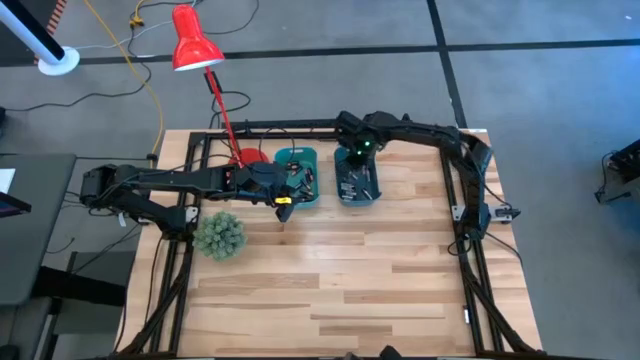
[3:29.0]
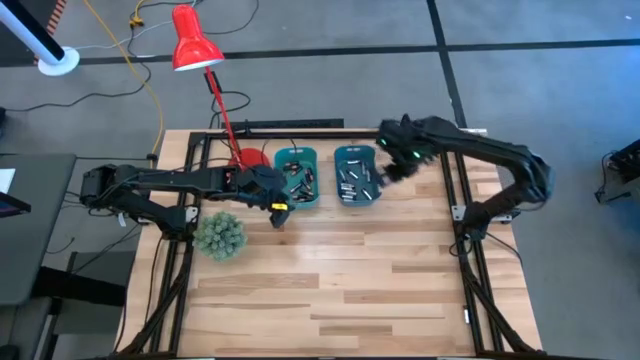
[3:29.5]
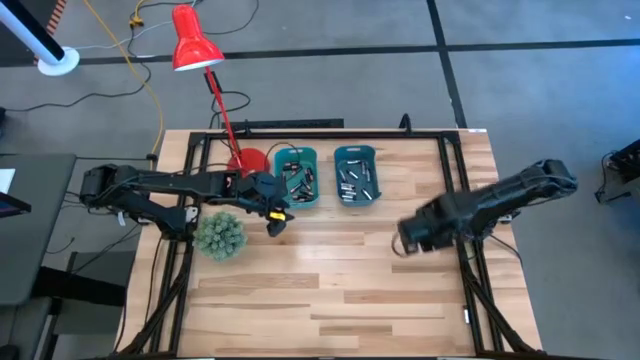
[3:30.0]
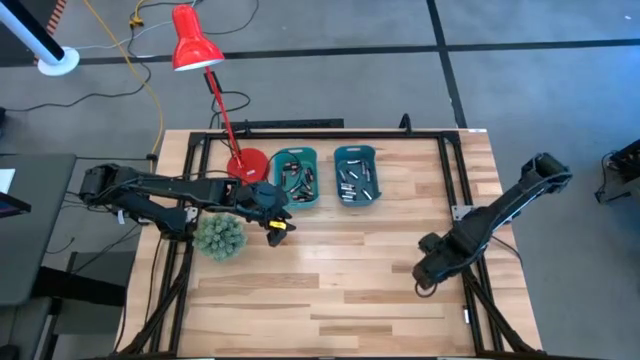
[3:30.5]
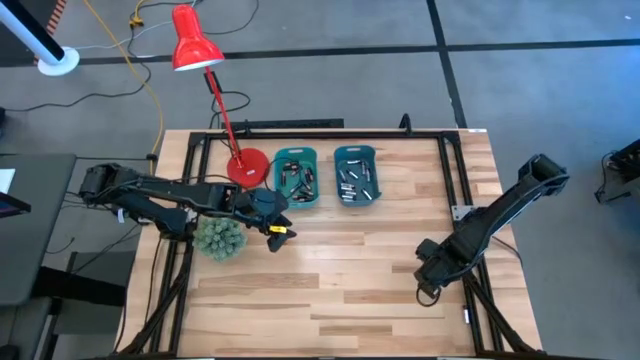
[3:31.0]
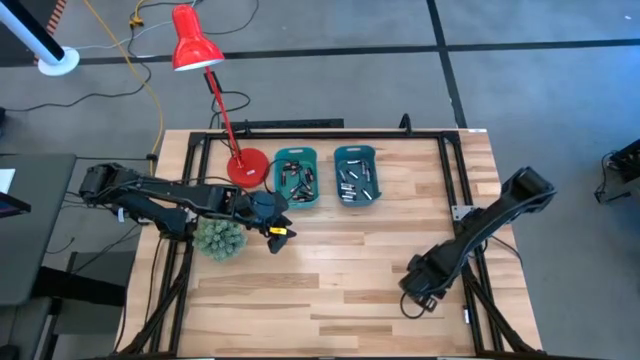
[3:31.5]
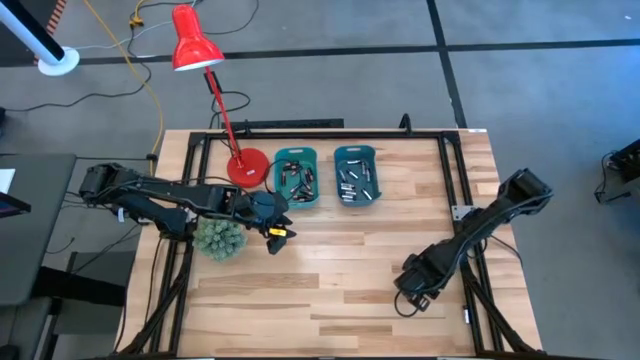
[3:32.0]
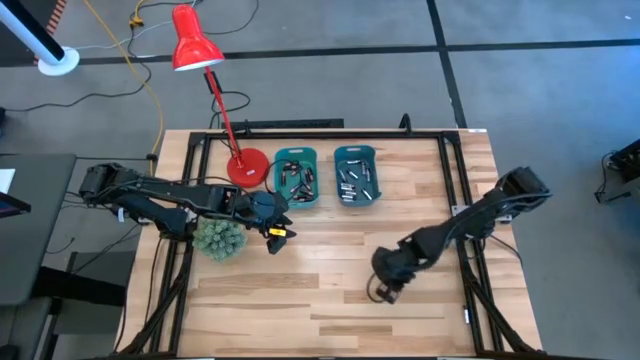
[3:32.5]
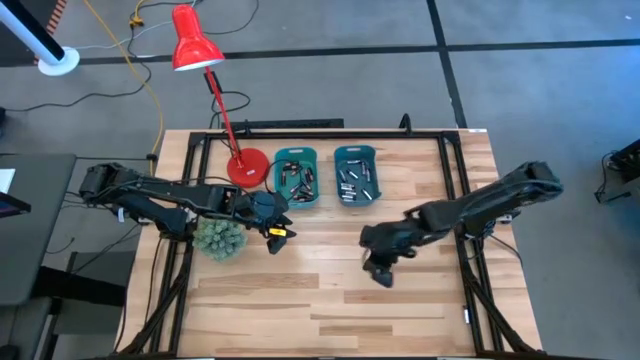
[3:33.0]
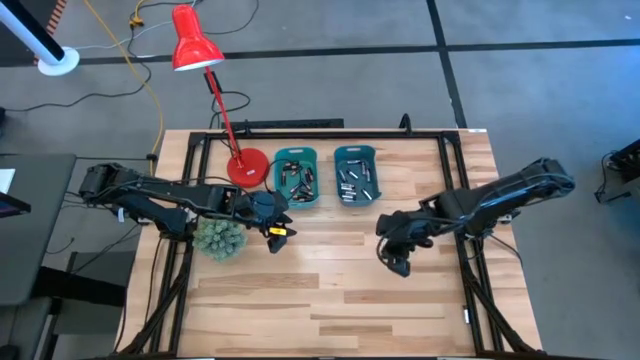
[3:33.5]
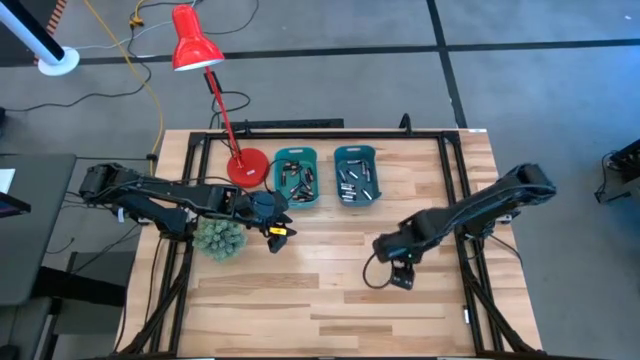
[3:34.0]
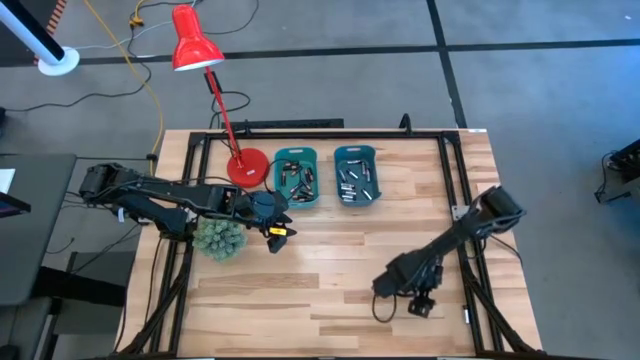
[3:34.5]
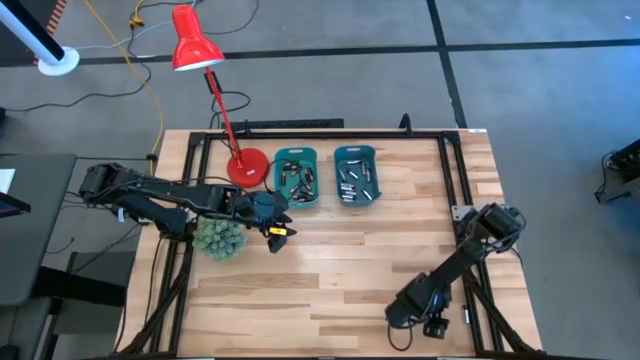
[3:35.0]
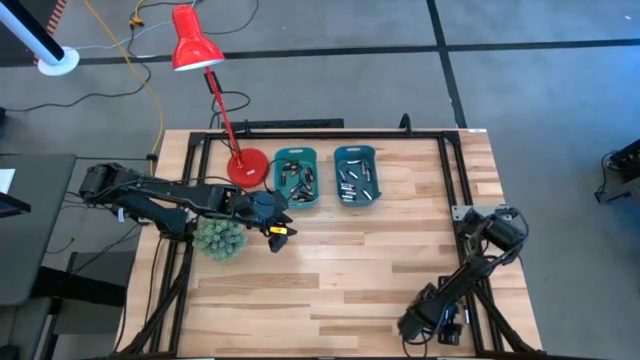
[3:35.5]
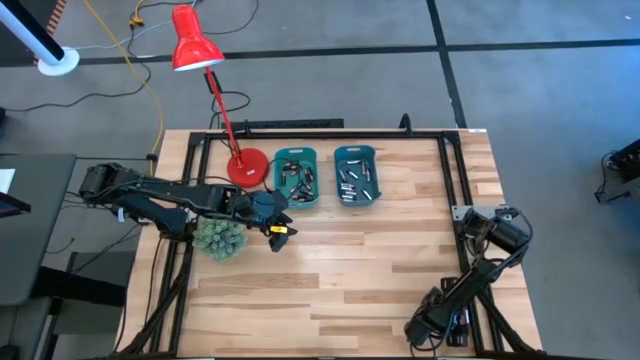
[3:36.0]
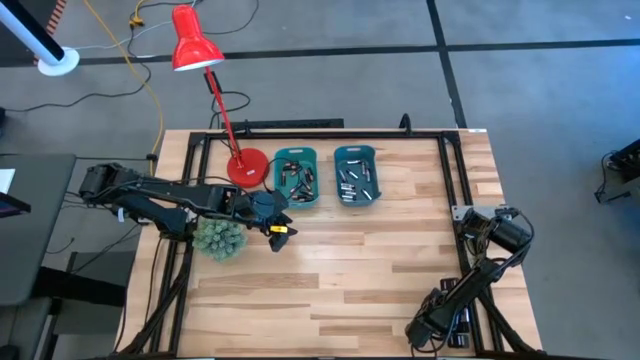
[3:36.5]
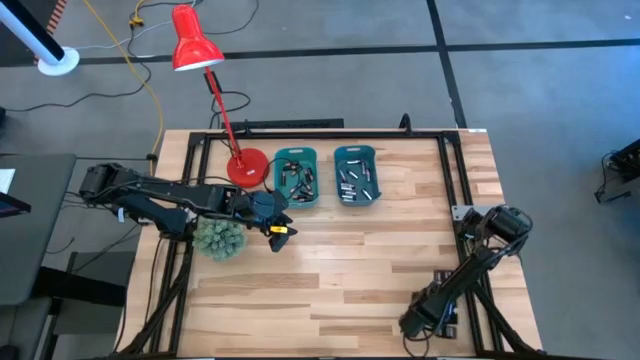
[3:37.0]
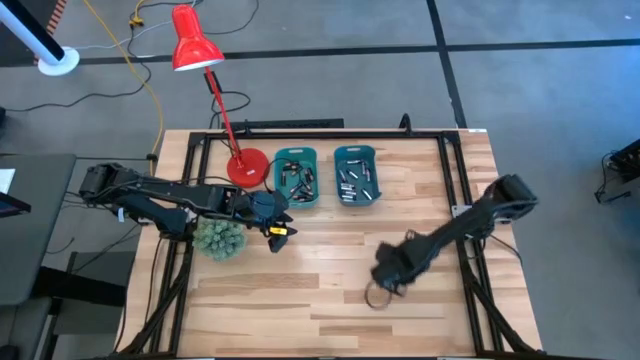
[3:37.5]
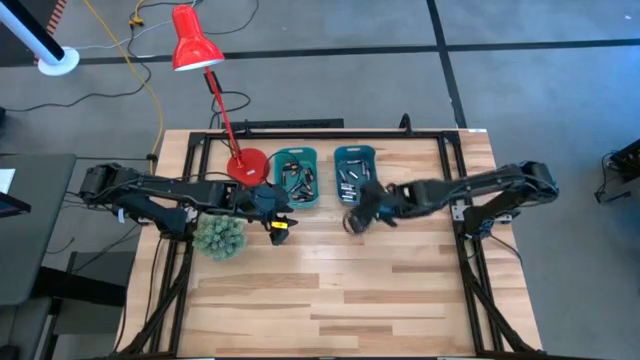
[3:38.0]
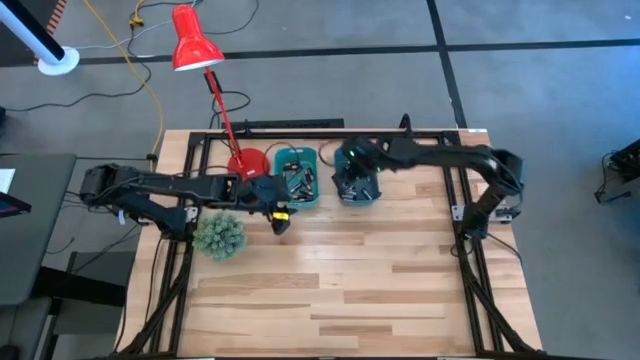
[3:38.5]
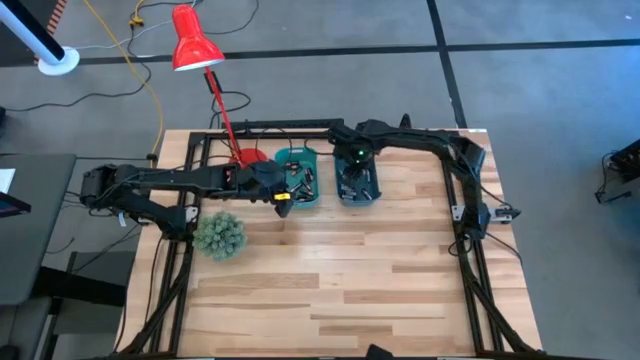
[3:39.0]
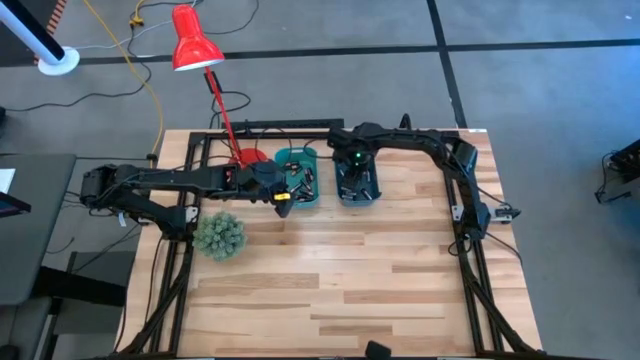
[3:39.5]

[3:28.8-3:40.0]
Task: Sort batteries
Put the silver battery into the blue bin

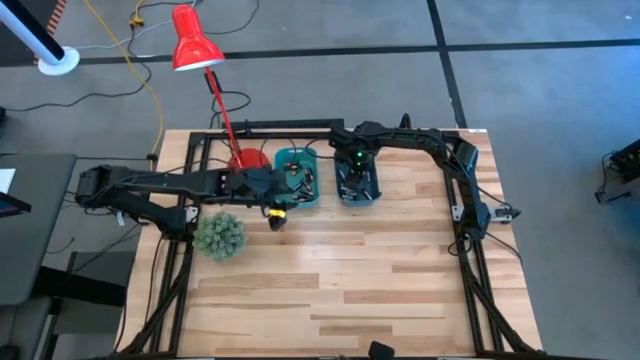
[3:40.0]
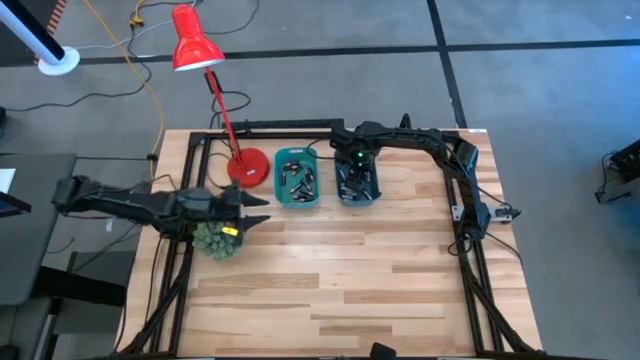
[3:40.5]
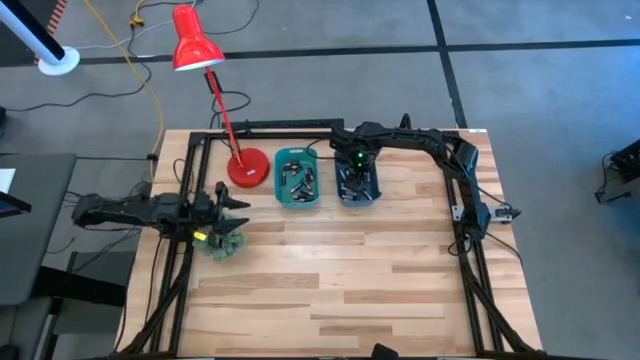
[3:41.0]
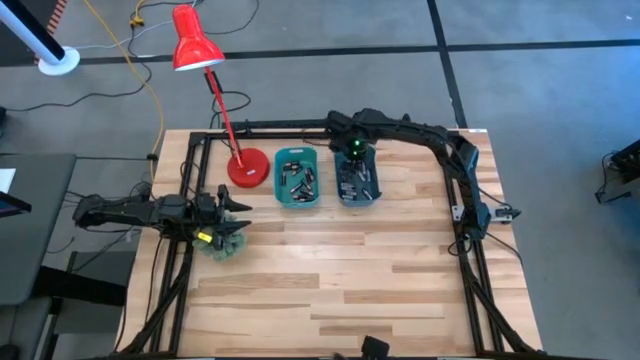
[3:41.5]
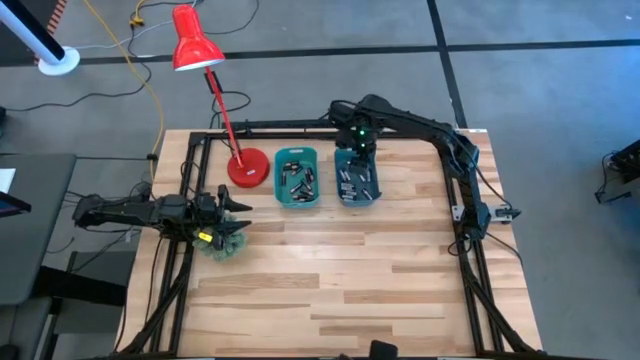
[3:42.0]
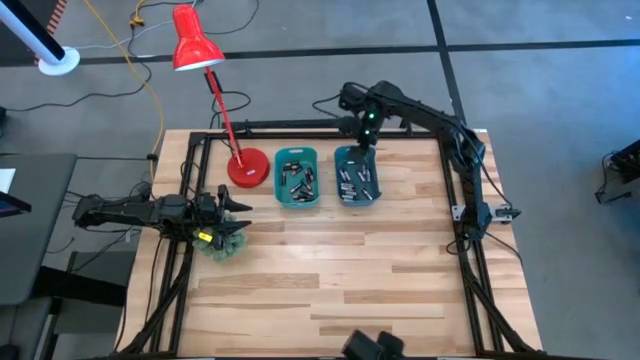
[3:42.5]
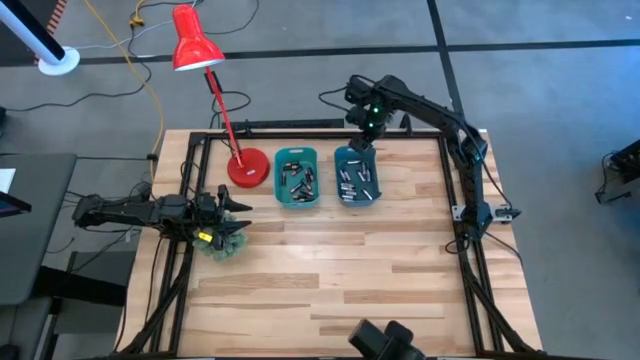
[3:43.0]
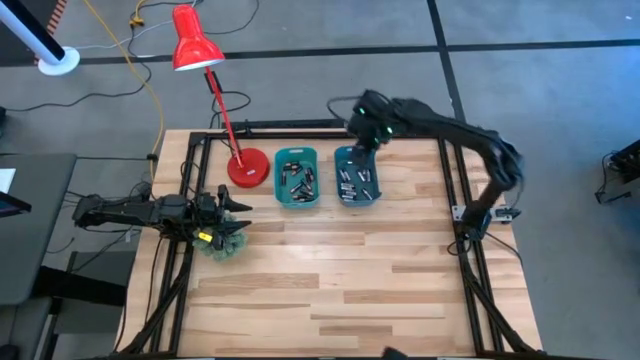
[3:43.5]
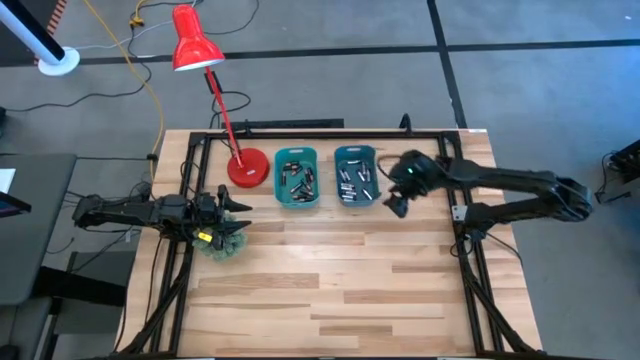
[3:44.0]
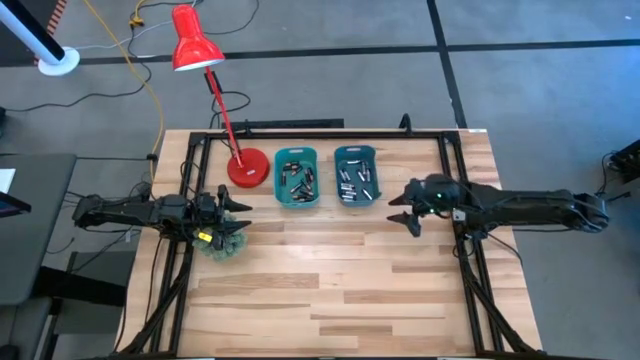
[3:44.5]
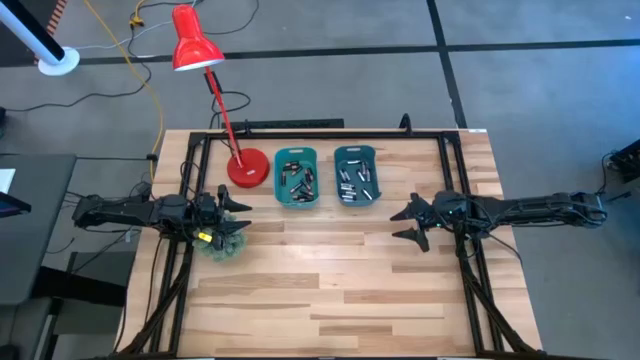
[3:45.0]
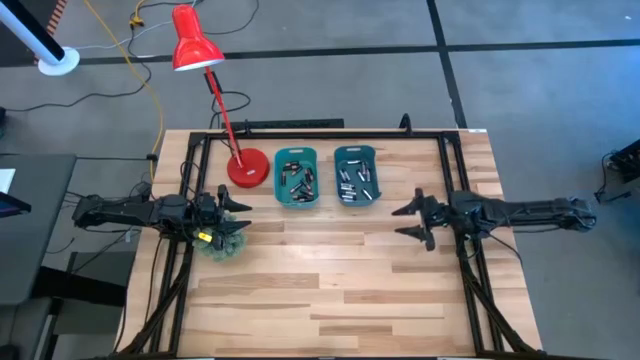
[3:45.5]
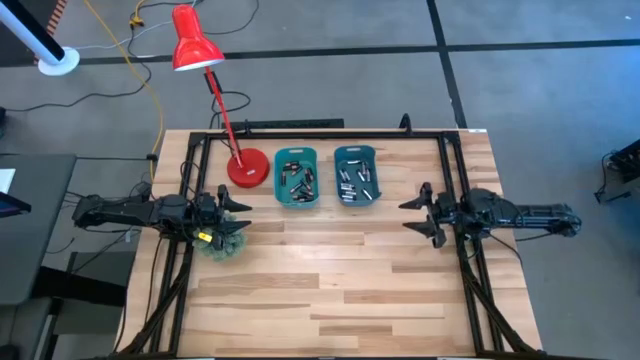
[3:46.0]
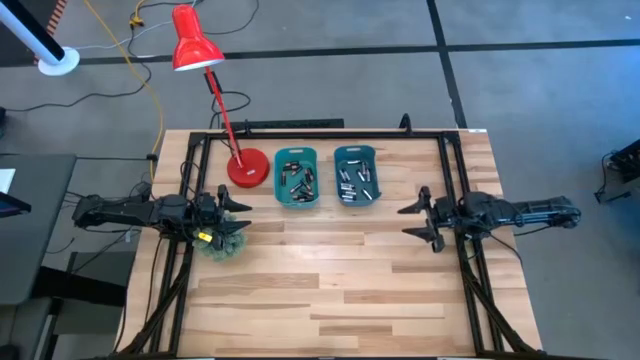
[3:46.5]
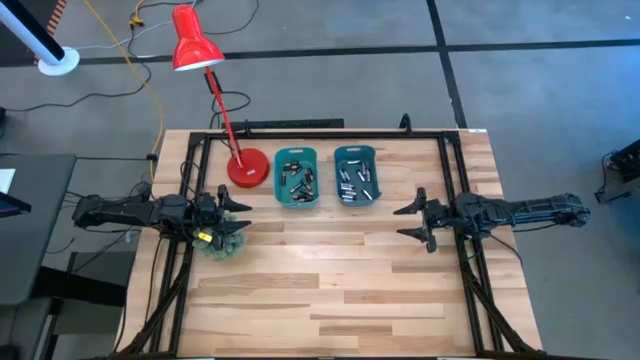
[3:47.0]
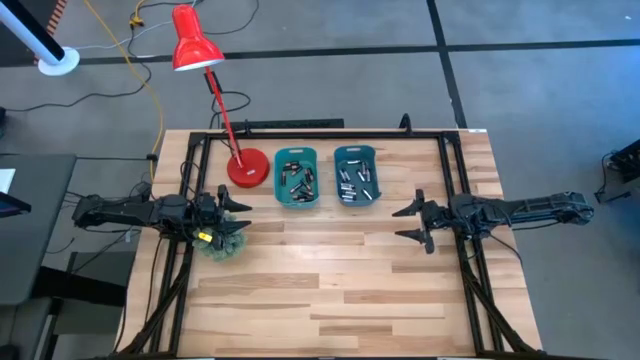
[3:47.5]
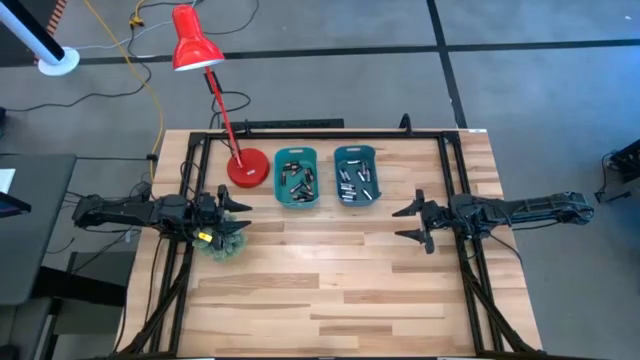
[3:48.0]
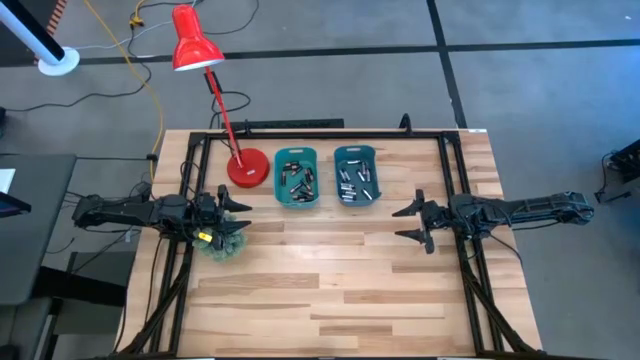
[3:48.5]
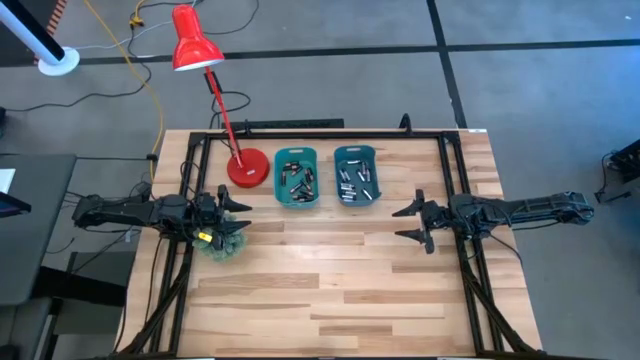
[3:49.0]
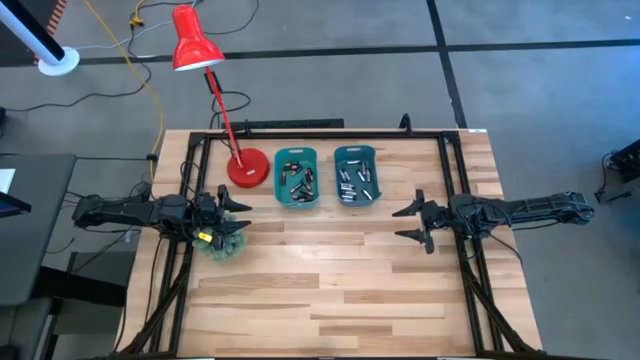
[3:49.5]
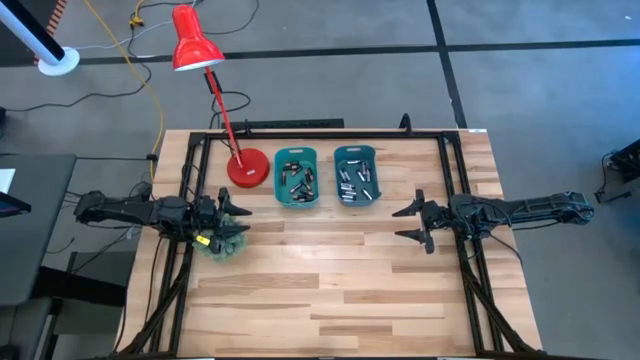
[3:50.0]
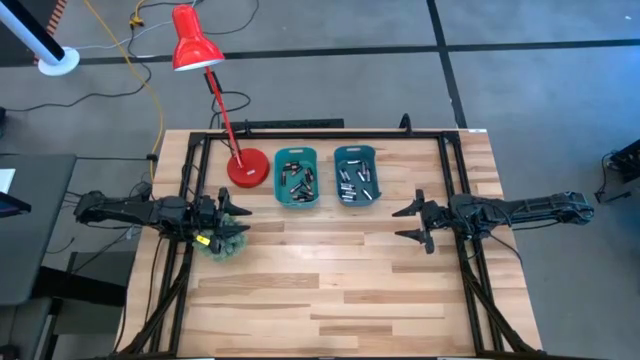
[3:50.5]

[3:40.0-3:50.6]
Return to Home Position
